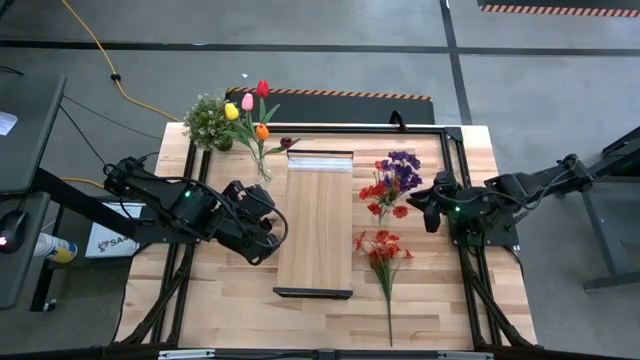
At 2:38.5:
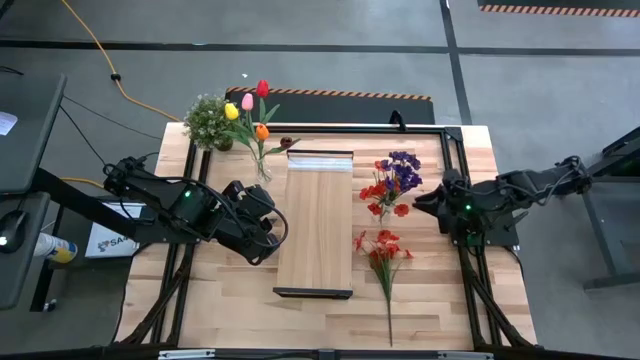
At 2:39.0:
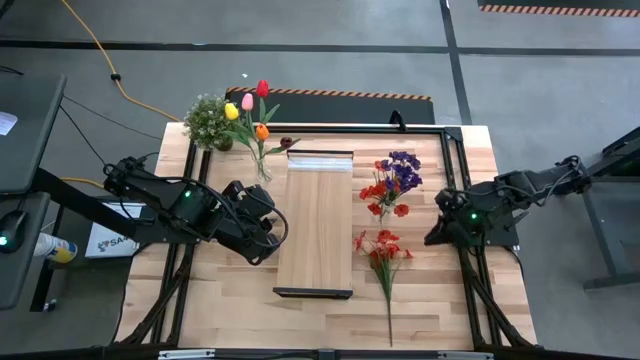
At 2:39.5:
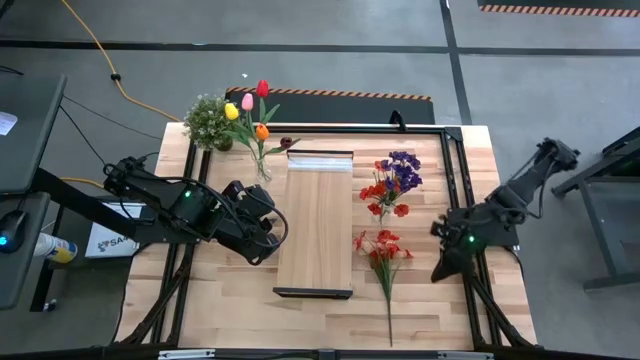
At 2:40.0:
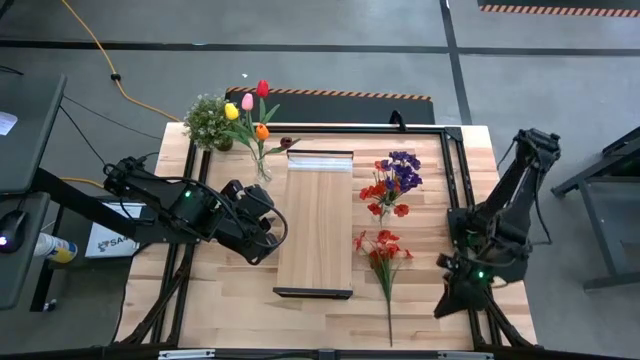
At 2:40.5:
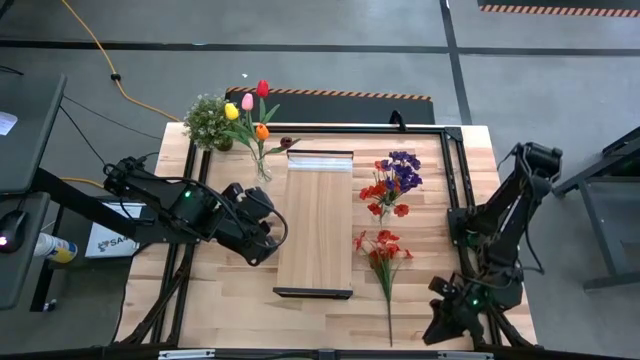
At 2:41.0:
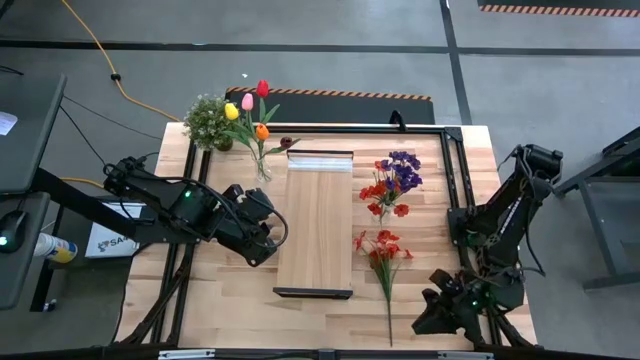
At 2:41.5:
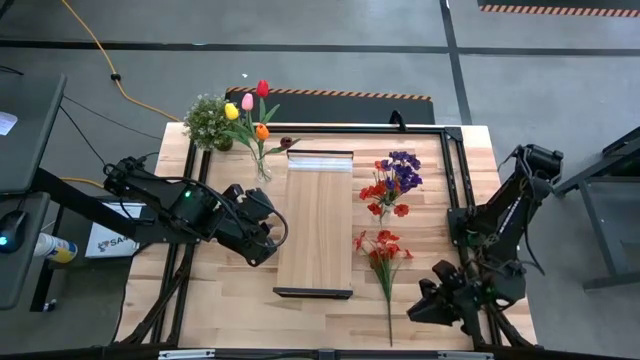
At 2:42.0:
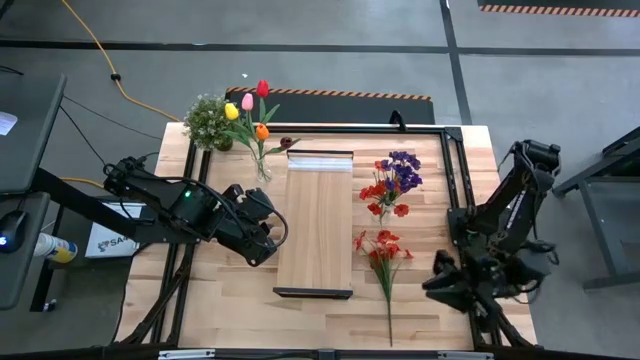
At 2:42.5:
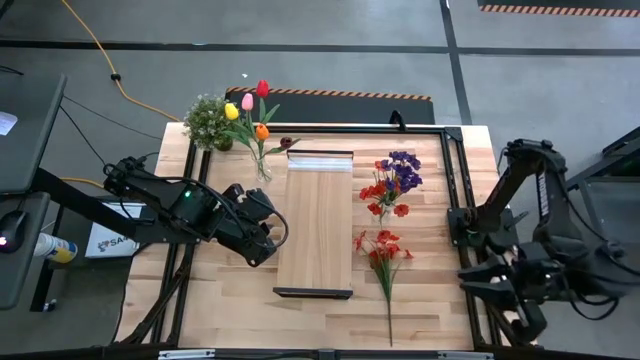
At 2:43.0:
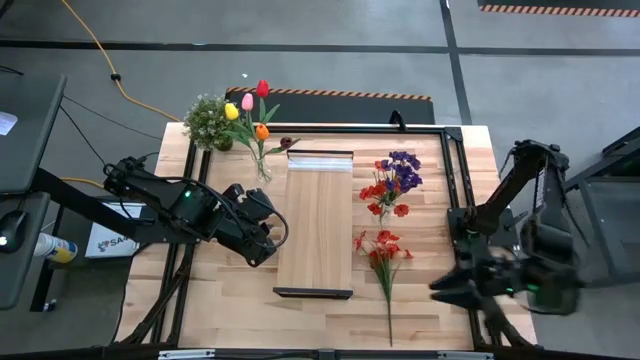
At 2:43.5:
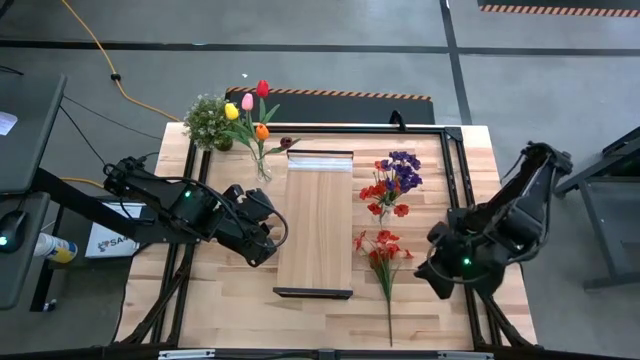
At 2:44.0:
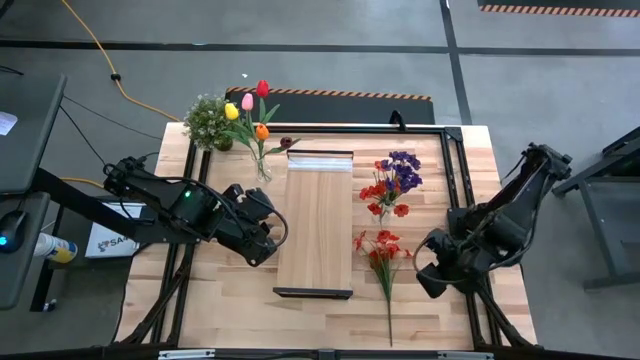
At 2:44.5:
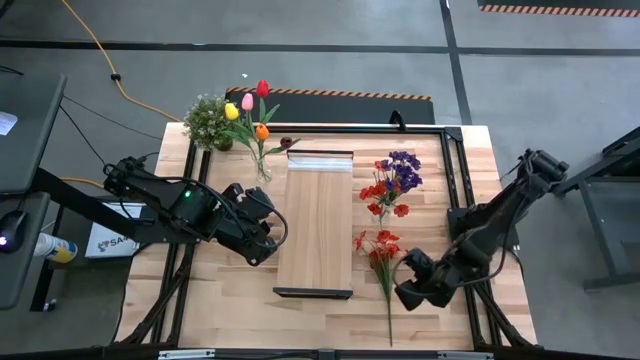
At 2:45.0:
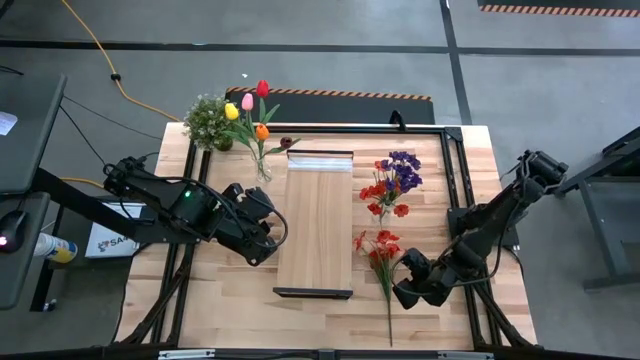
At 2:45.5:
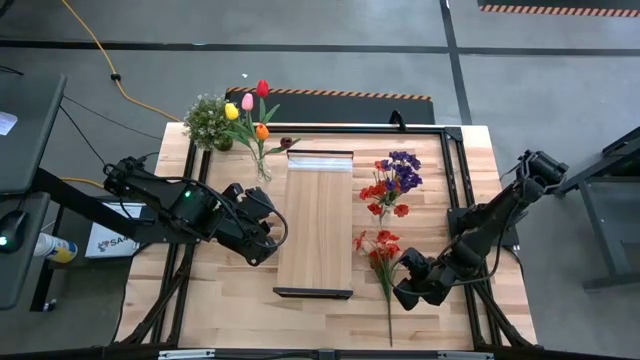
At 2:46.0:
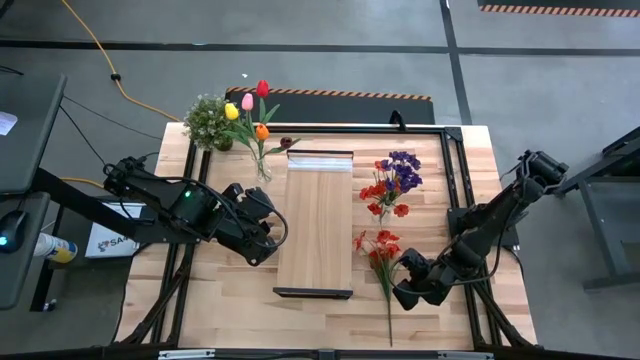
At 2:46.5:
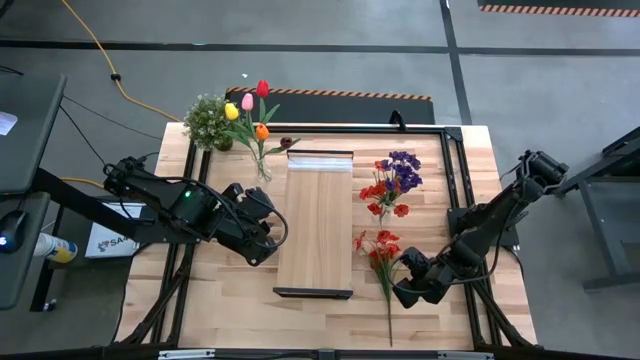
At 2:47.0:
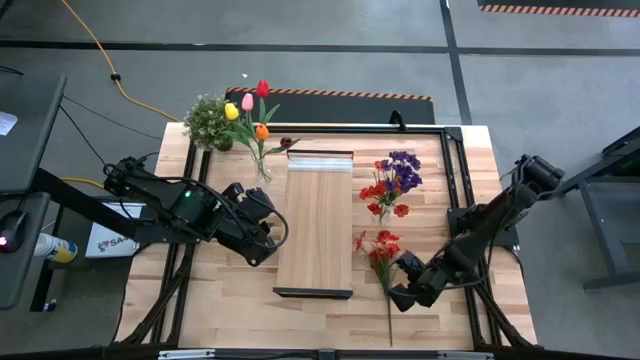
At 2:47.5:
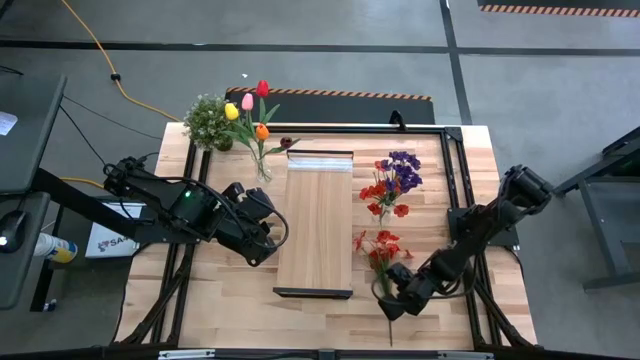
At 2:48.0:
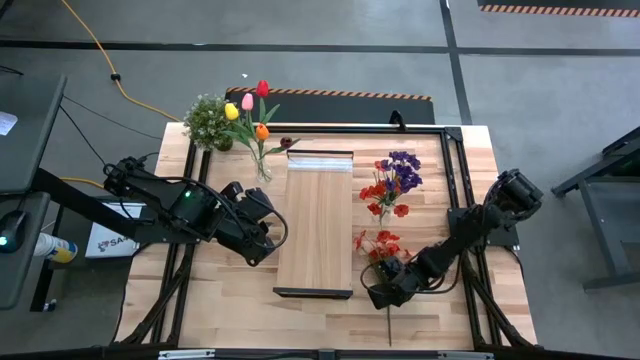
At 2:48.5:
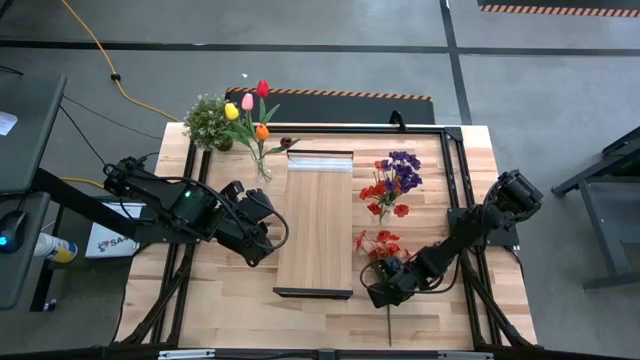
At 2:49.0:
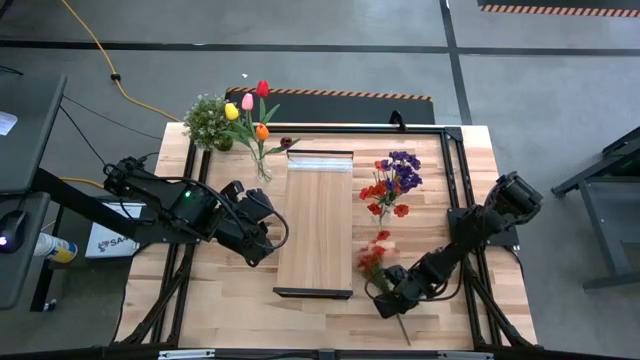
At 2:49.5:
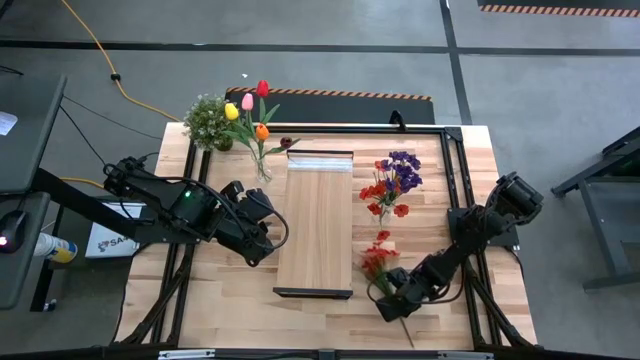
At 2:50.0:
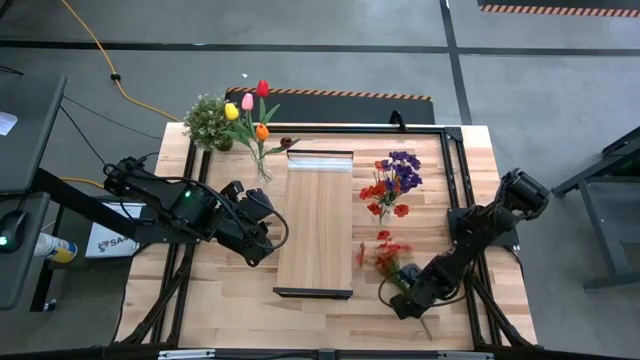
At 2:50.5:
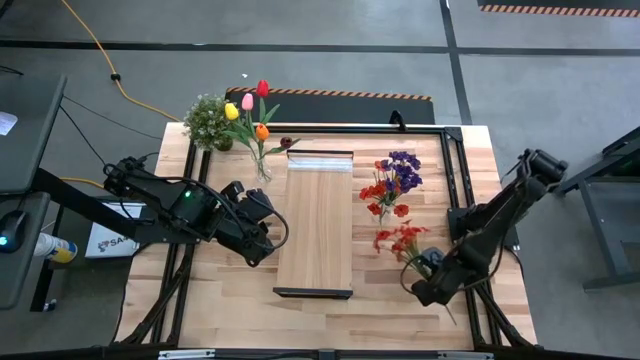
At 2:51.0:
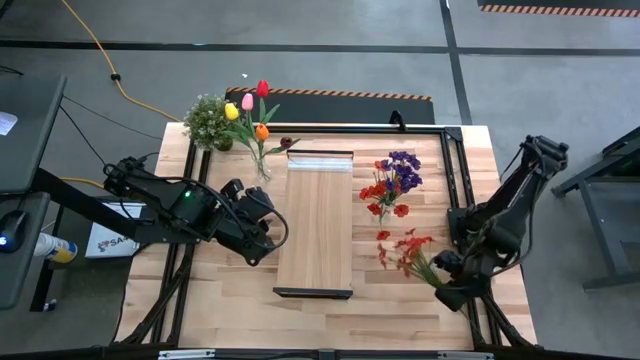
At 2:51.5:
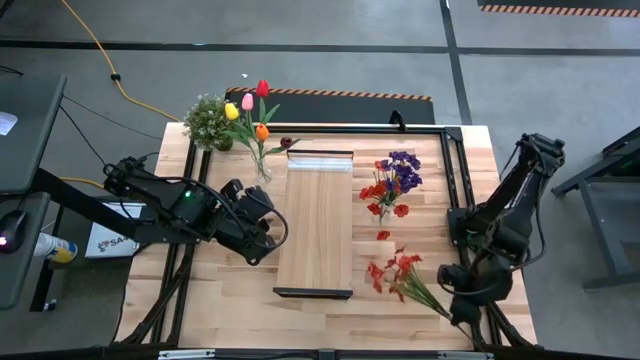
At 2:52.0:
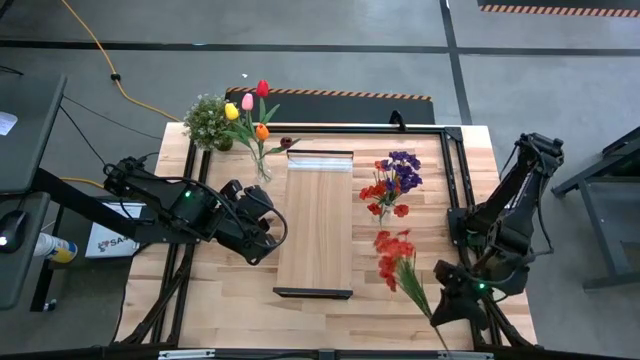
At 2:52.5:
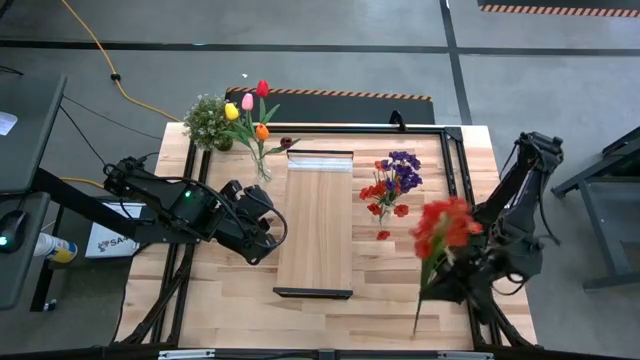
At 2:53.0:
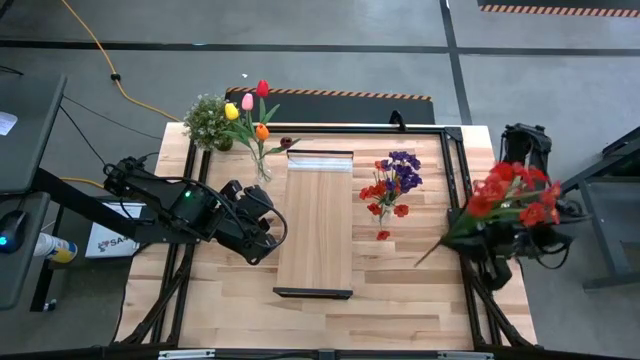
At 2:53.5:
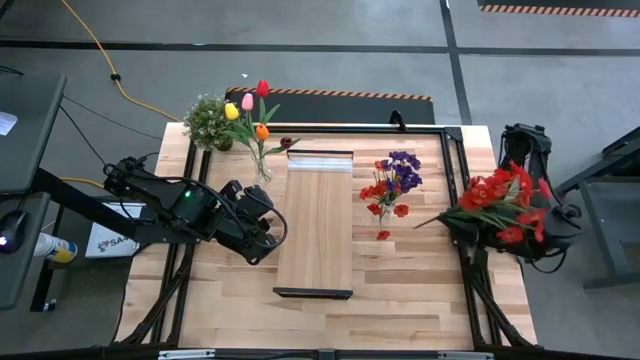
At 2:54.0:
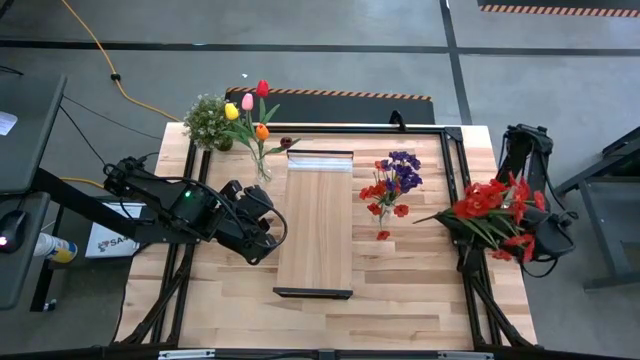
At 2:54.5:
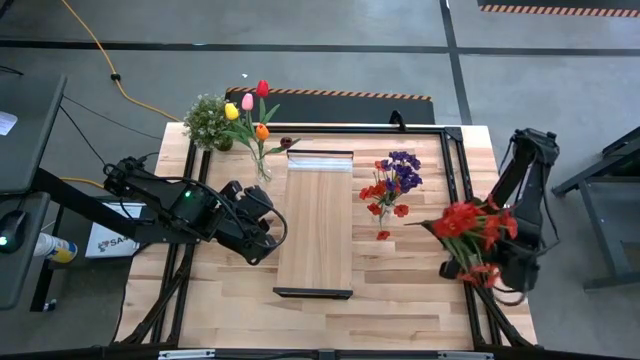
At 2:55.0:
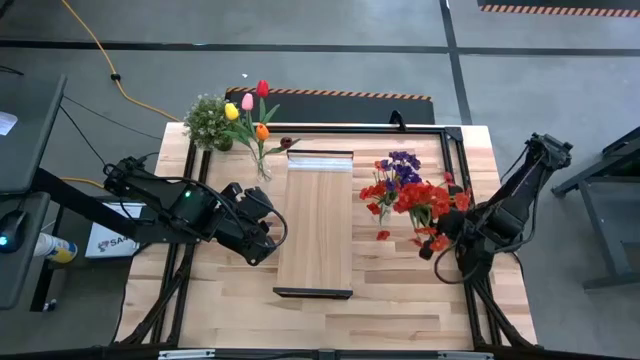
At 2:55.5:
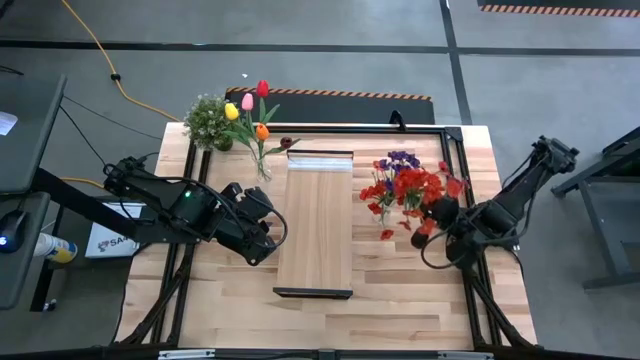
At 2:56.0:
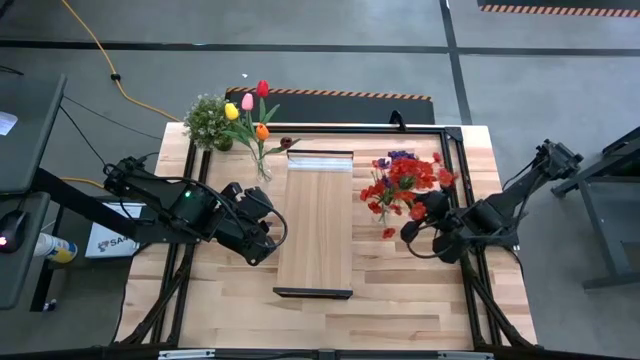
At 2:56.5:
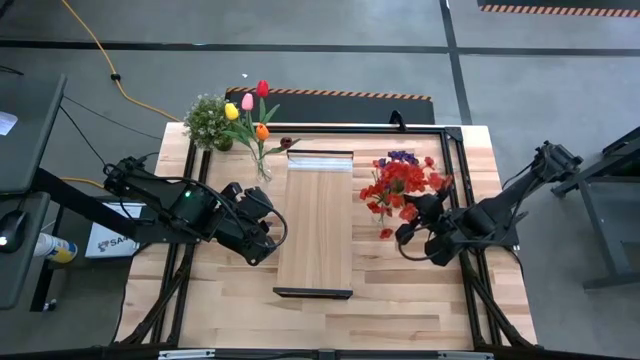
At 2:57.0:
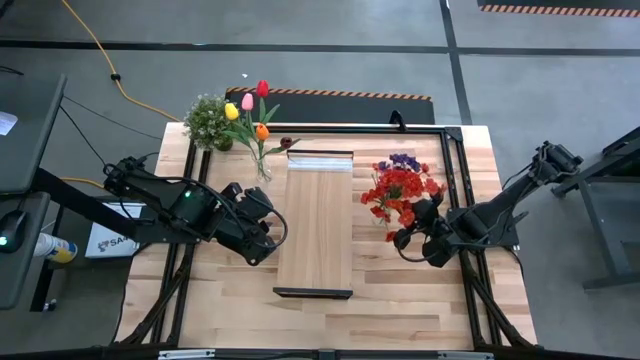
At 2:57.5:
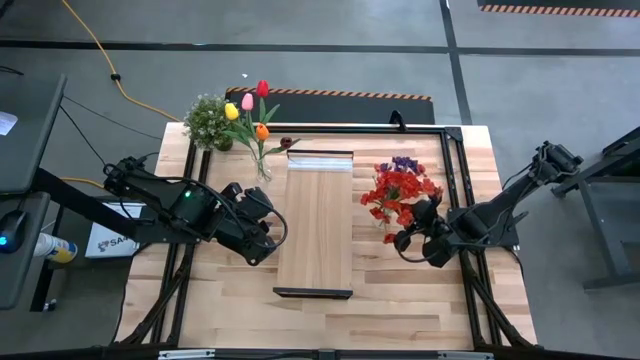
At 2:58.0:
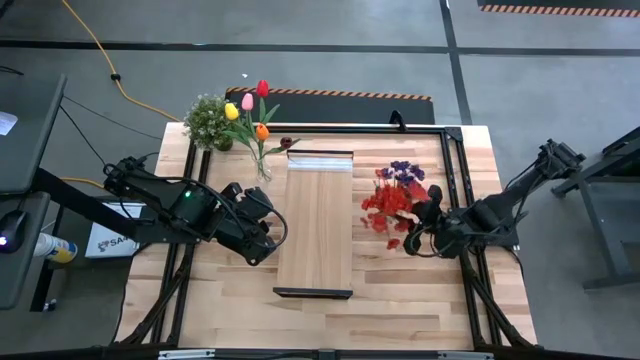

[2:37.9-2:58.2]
Task: Pick and place flowers into a vace then onto a shelf
Put the red flowers into the right vase
